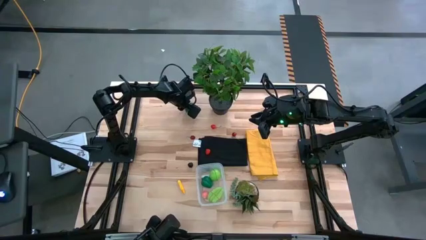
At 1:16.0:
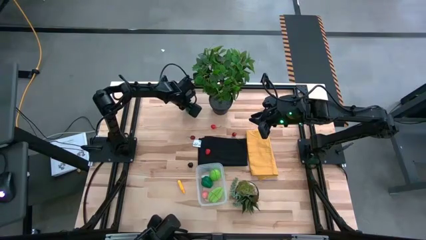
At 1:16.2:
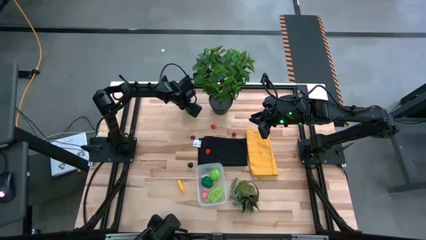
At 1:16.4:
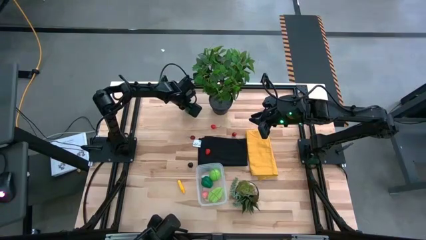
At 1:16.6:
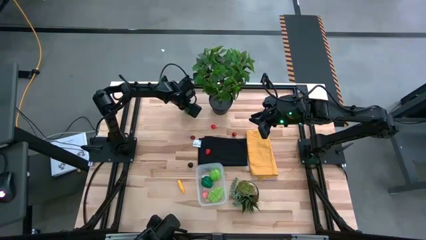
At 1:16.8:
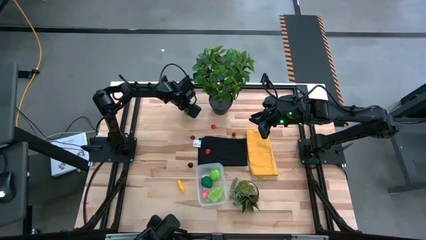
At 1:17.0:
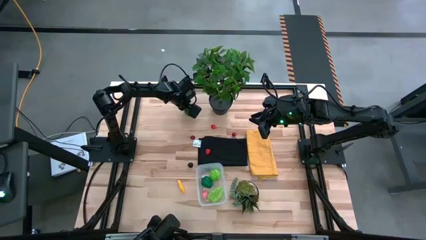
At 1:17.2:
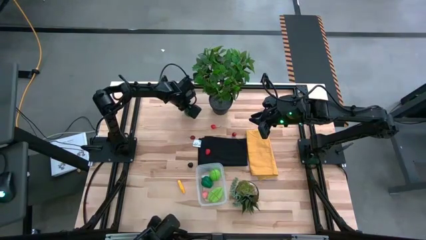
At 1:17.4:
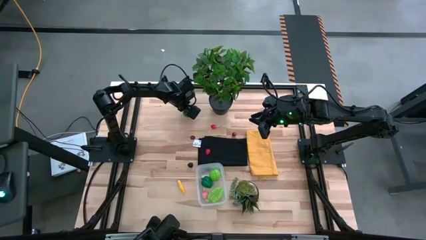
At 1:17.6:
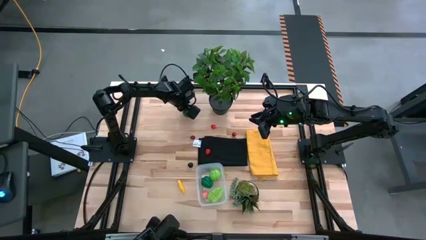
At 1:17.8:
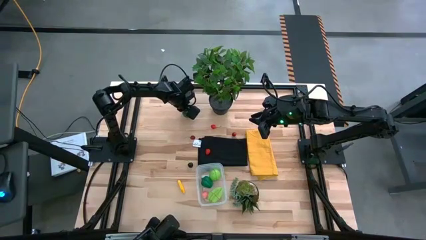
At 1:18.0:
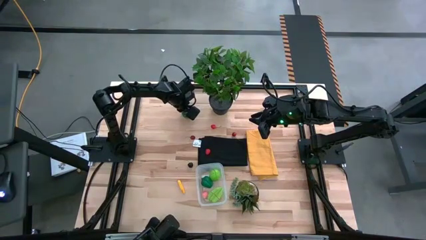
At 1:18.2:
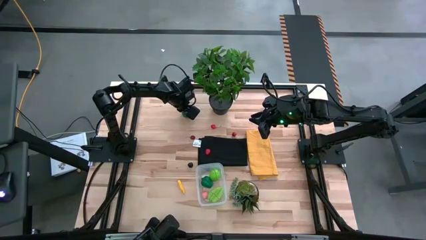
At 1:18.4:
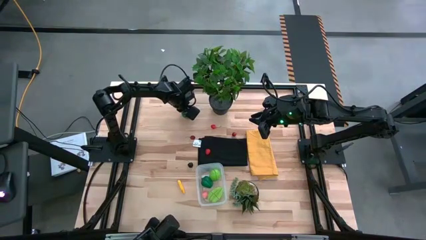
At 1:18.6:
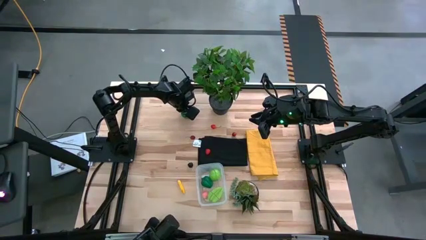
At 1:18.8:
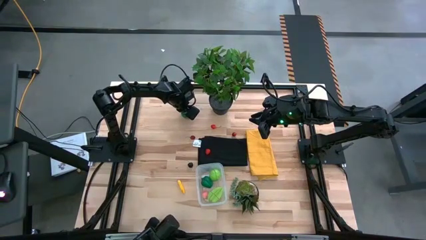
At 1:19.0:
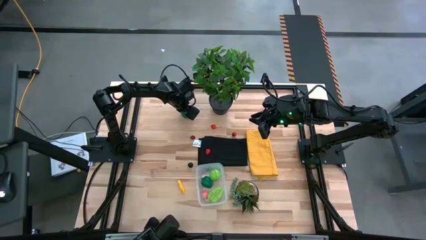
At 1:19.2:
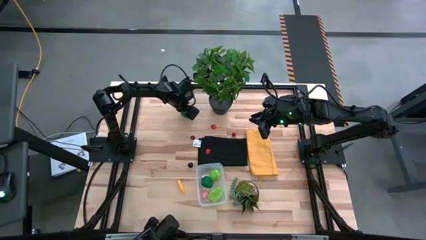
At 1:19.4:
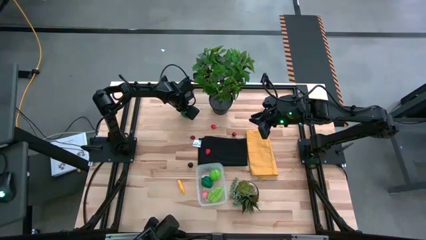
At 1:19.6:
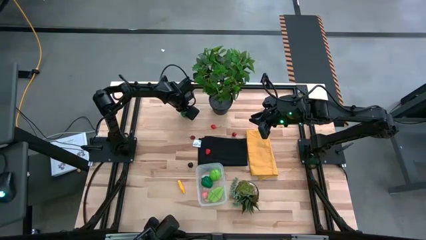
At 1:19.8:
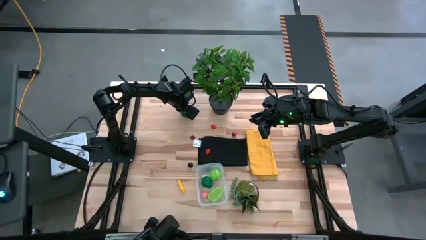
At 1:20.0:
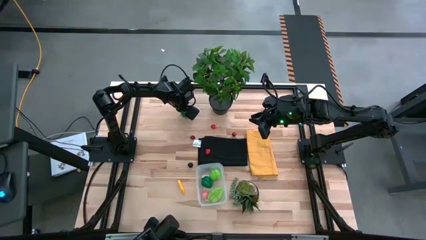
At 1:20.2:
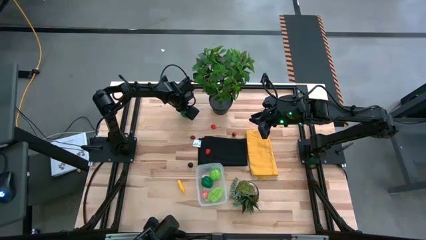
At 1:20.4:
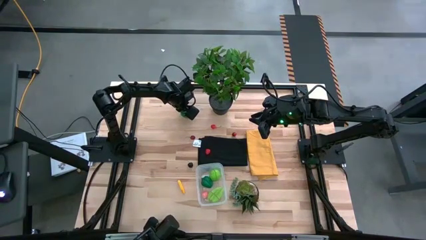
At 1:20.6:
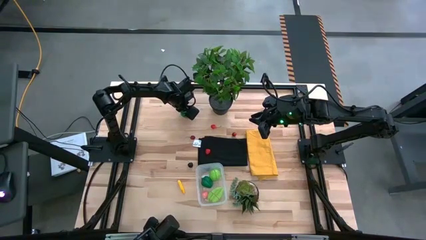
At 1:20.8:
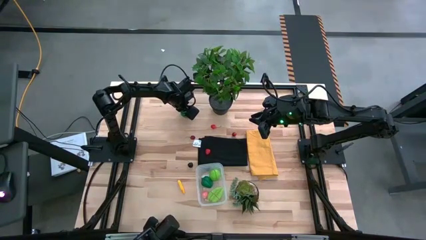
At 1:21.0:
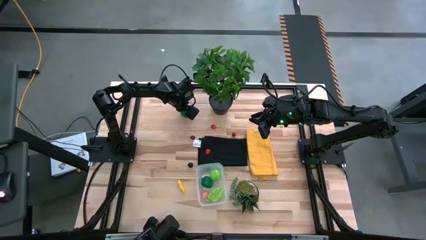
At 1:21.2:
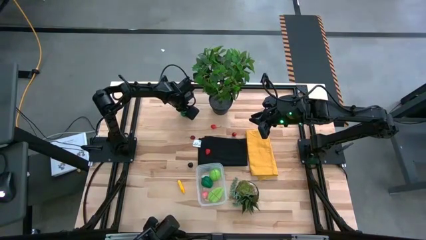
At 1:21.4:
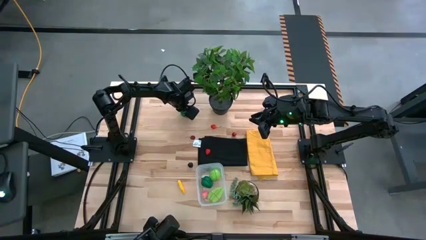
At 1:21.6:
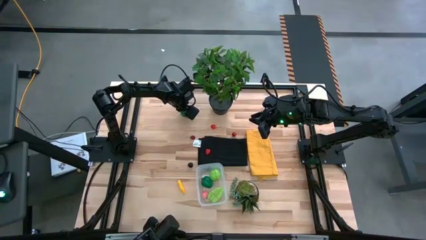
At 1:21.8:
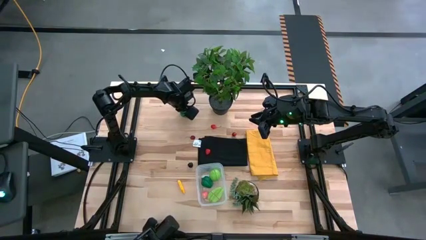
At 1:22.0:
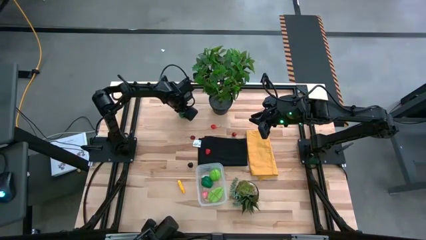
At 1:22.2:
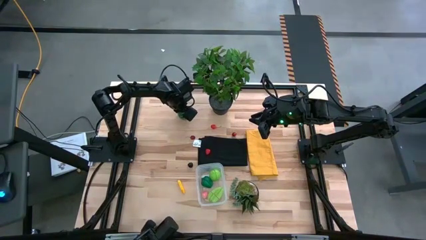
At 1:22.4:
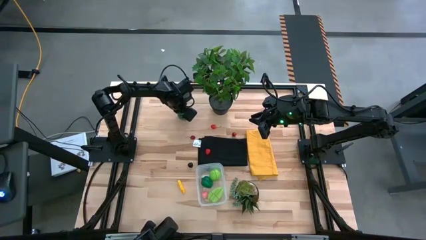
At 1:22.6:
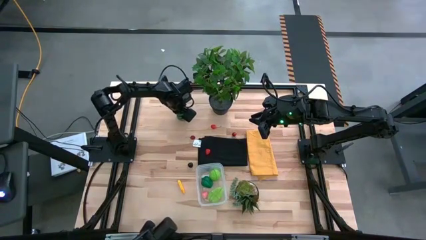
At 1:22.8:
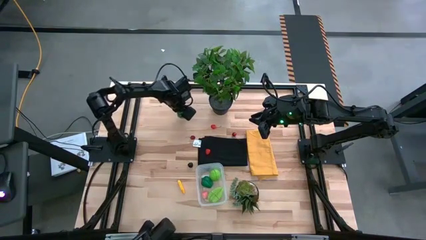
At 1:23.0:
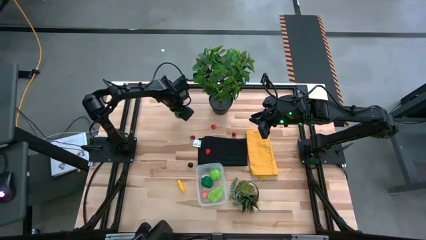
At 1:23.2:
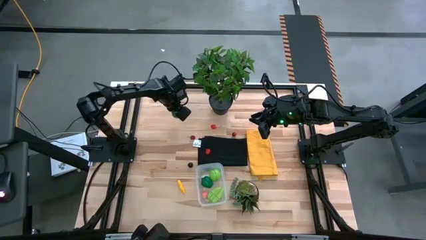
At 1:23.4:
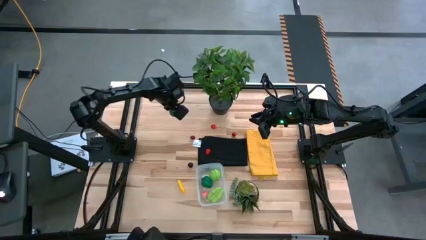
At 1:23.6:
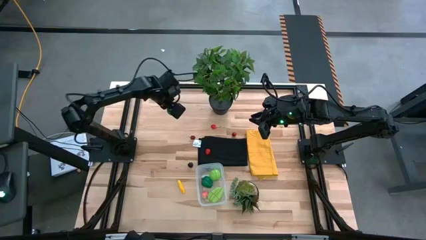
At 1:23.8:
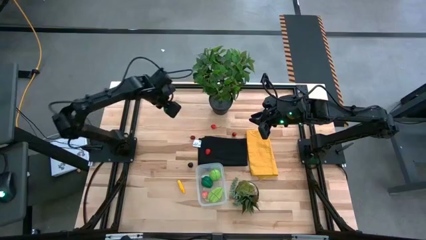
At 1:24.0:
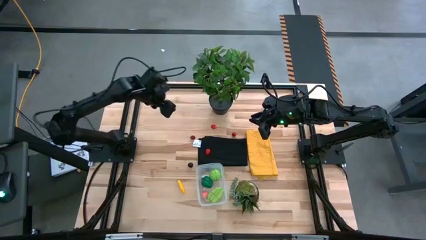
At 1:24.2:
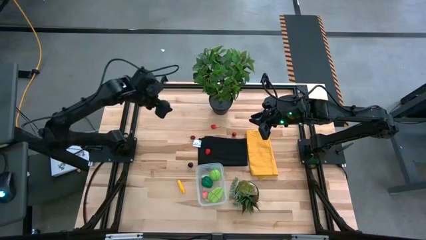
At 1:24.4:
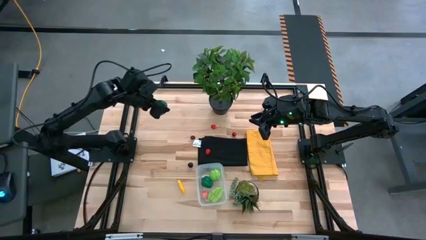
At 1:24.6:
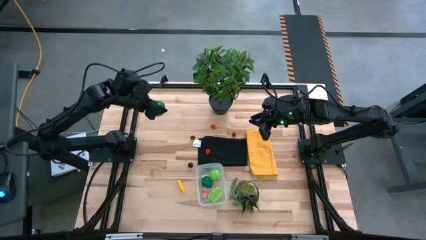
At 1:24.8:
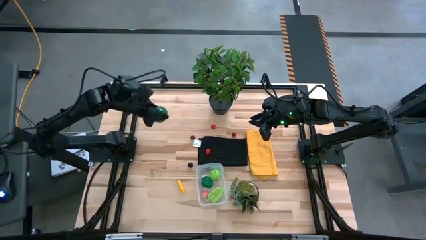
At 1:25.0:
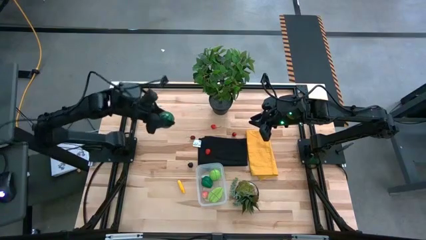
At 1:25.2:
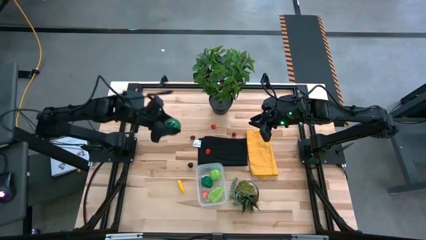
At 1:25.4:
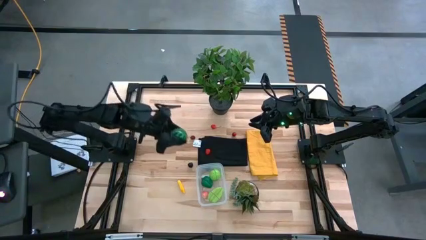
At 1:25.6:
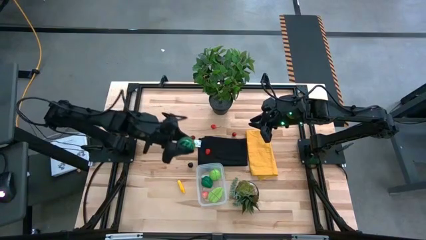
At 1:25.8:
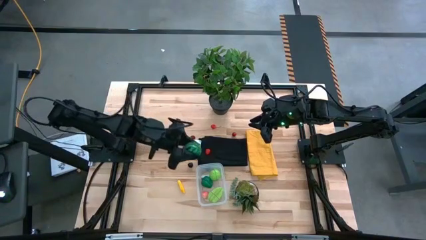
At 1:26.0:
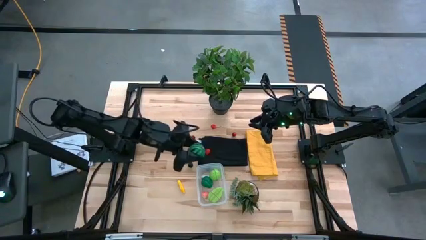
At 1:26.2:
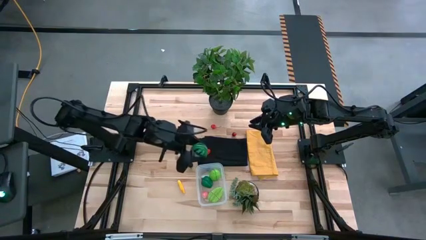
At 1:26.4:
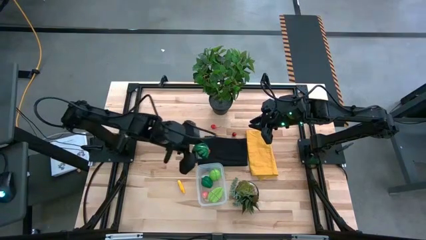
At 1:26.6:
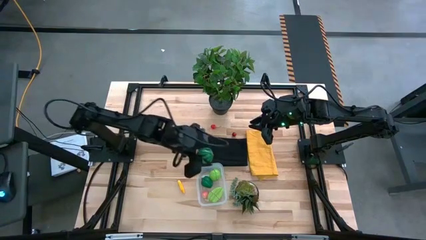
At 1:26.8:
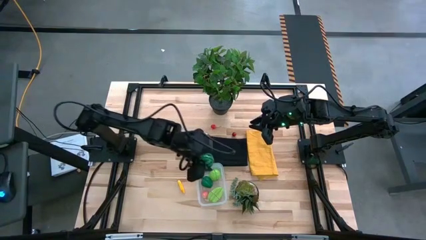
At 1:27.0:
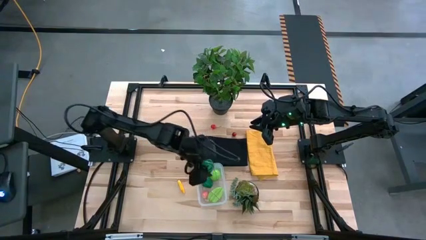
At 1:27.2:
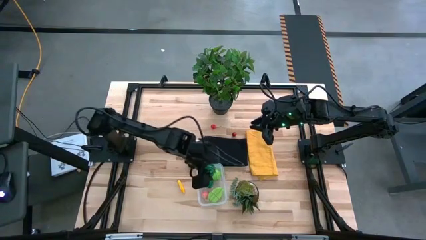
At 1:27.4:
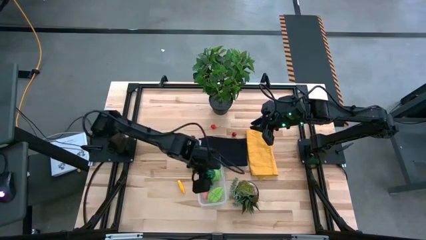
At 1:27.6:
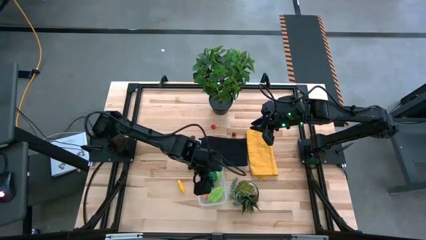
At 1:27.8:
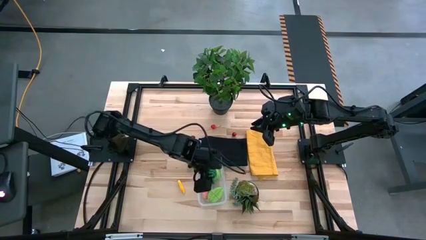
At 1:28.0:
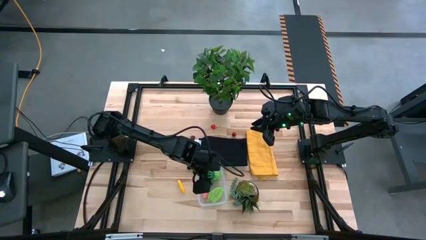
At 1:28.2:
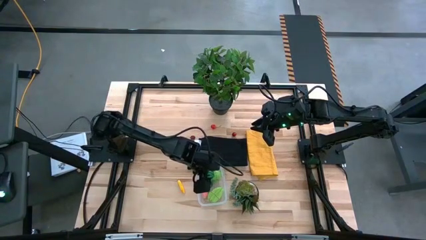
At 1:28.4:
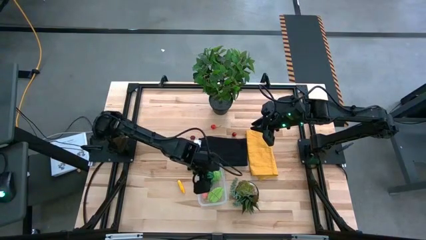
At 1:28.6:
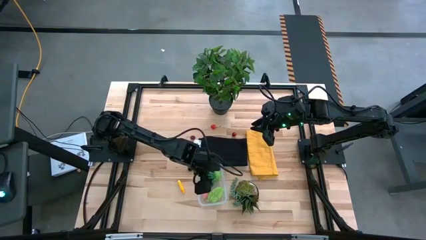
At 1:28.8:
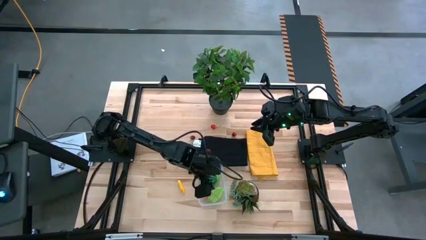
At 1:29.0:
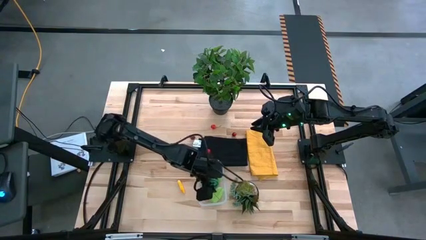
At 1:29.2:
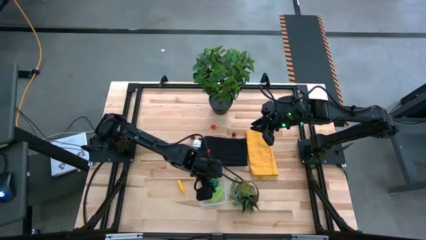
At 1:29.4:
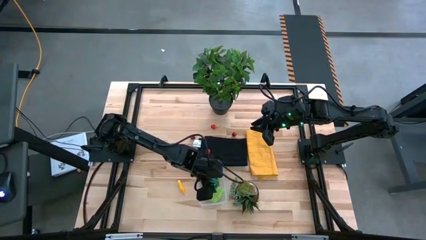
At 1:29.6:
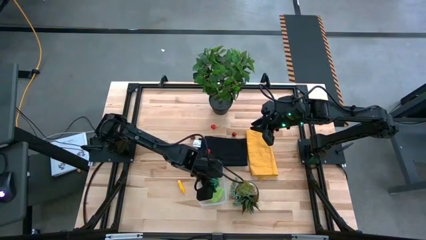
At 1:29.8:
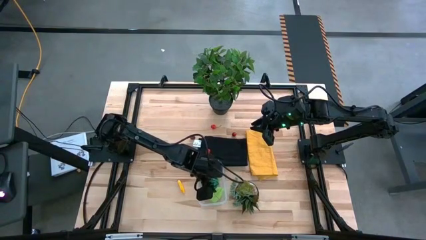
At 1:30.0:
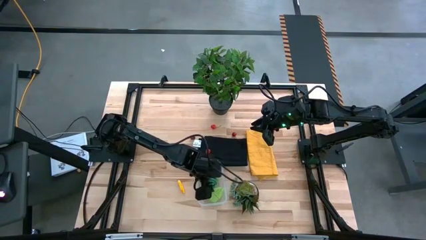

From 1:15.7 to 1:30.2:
Task: Pick and placing Produce into tupperware
Put the watermelon into the bin
